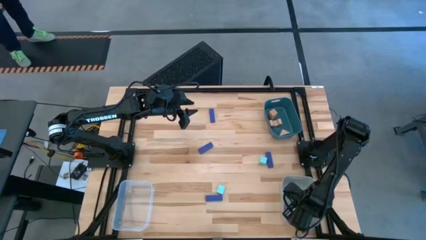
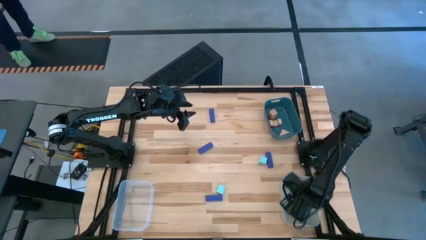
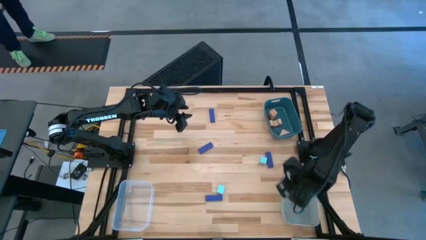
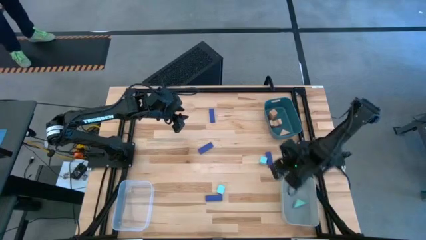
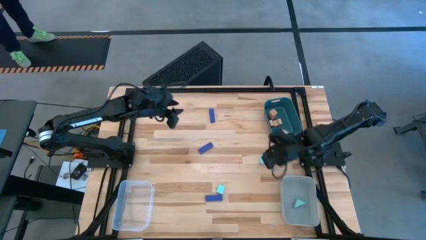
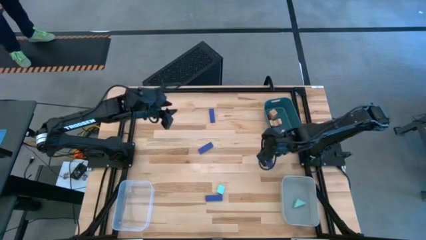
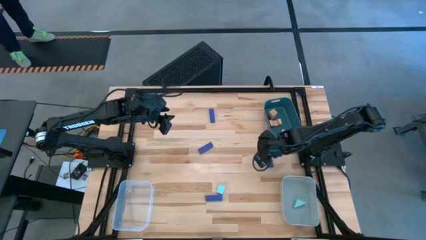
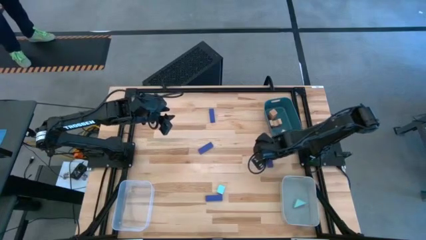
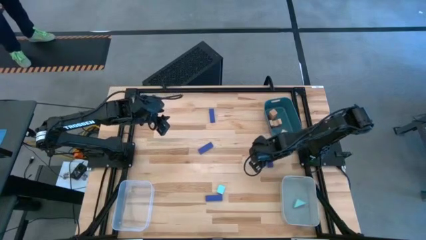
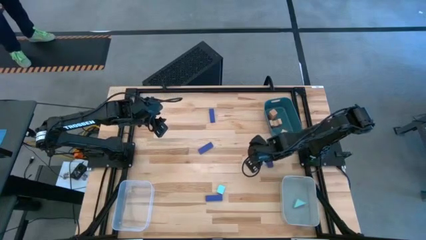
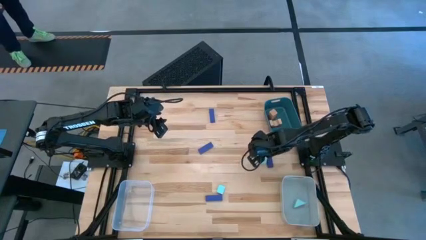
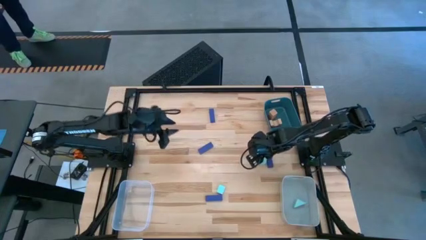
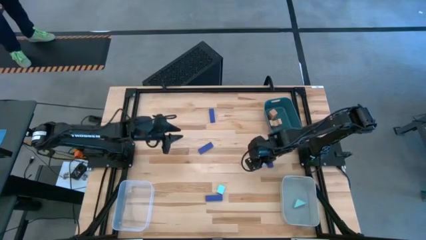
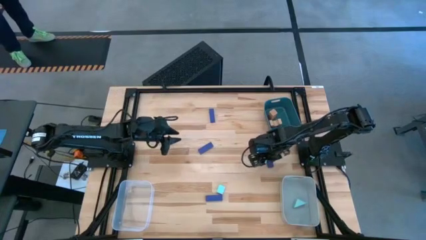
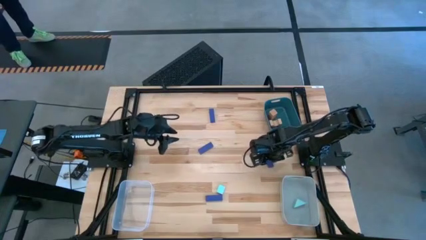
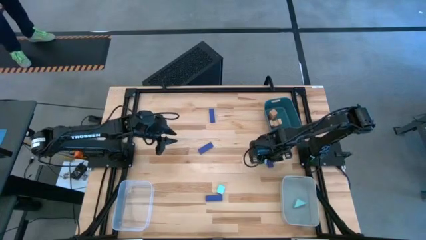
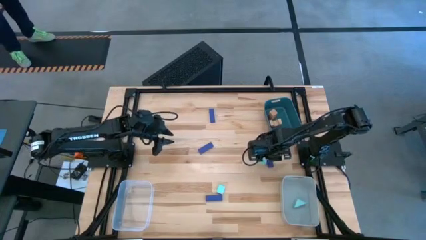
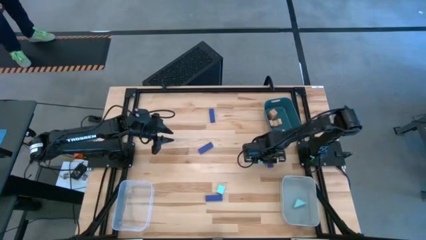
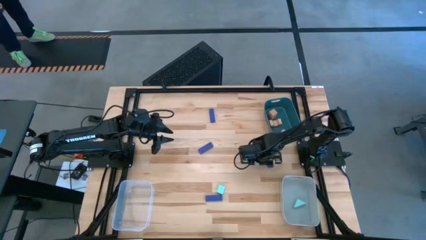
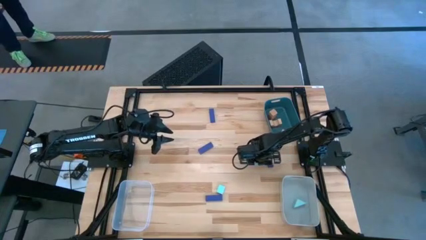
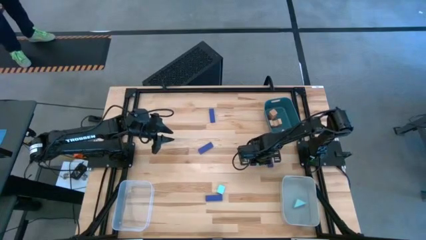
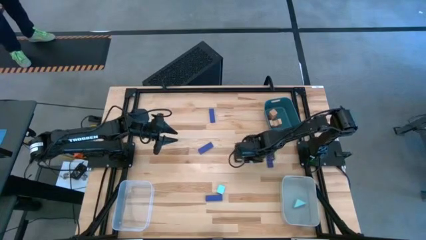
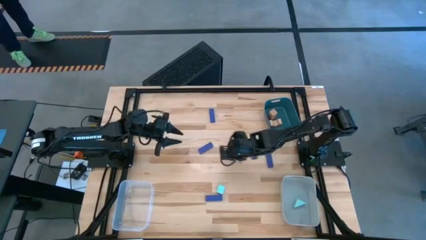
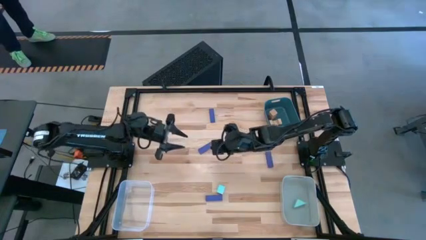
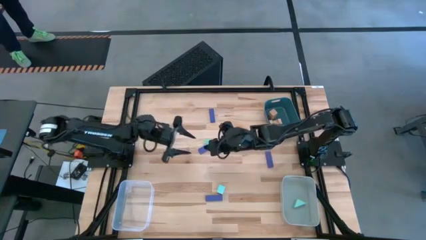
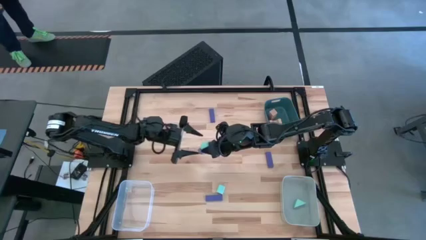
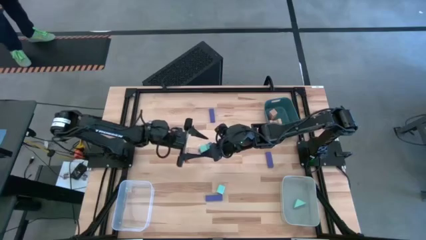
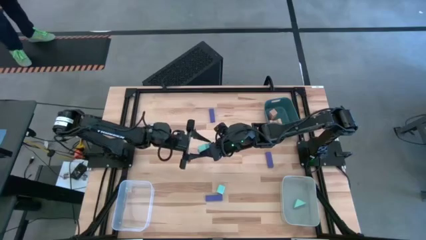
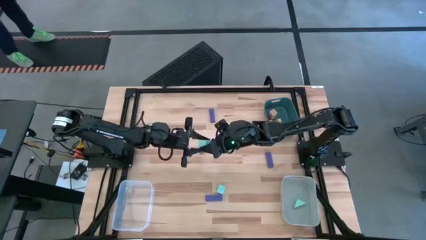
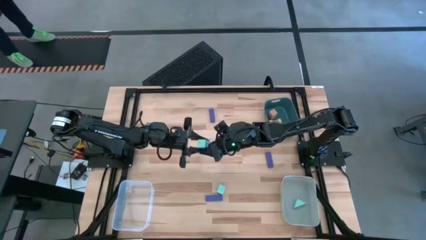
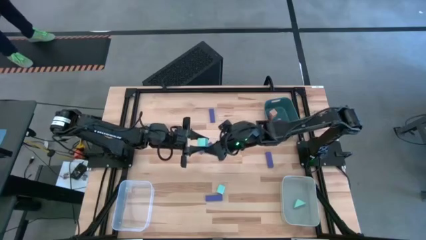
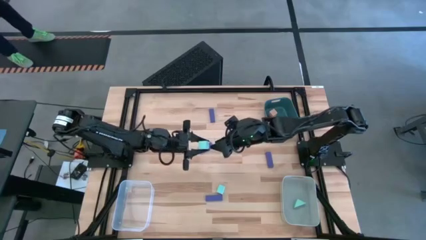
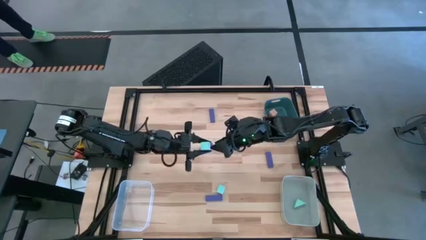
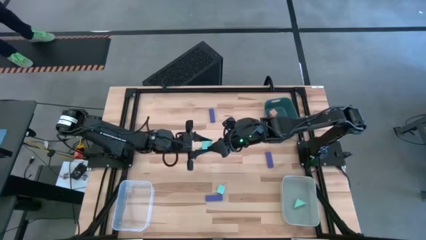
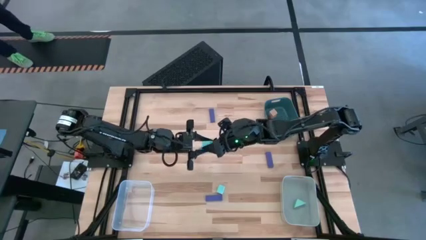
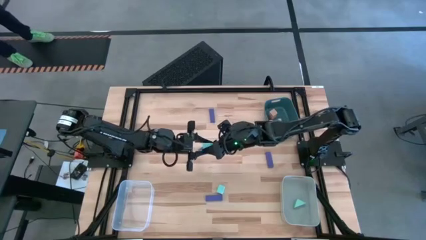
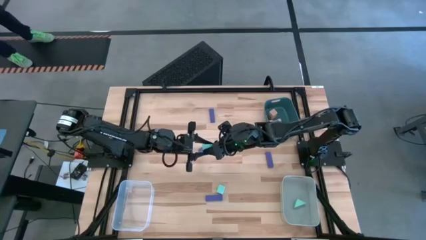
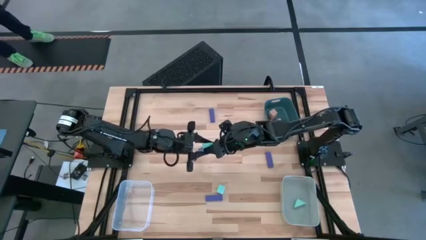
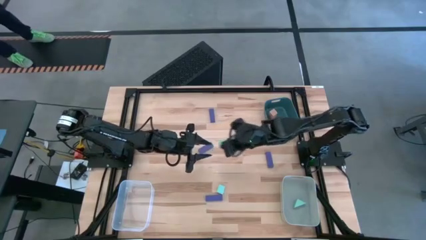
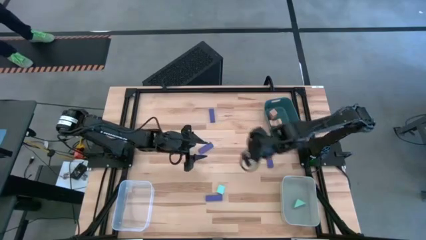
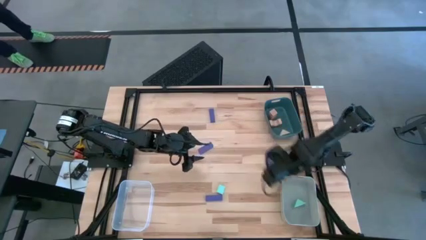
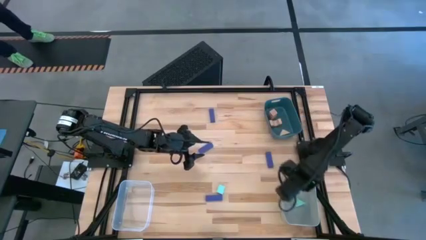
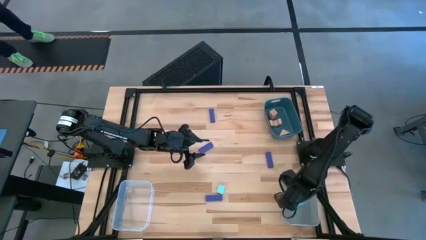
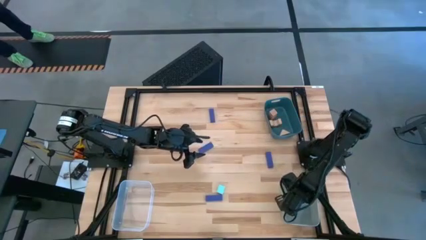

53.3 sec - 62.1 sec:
Task: Sort & place blocks by color
Put the right light blue block into the grey bin

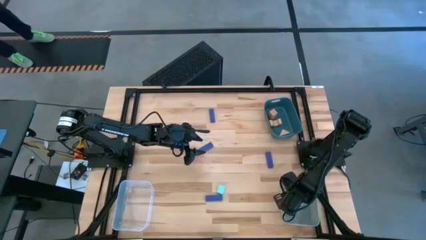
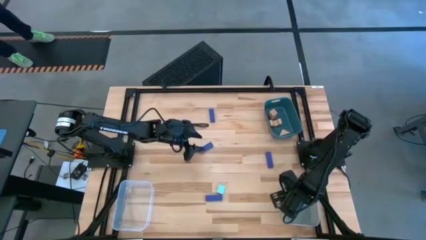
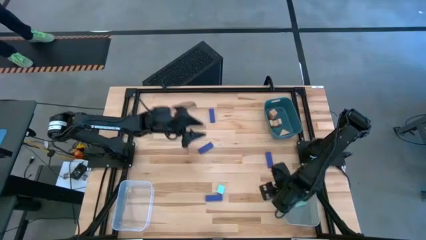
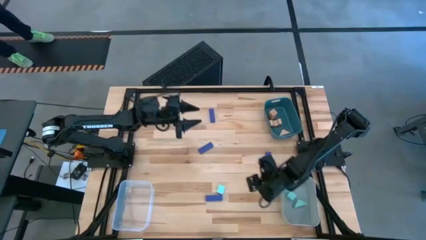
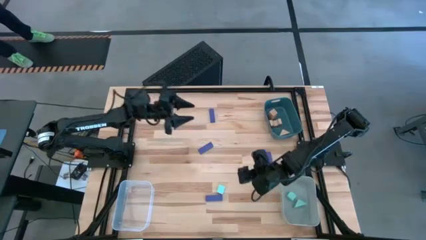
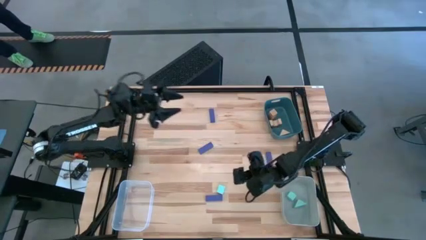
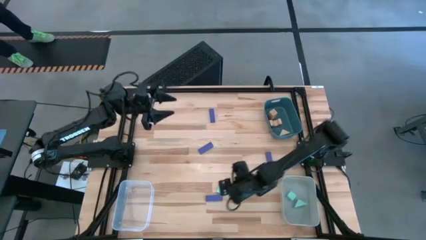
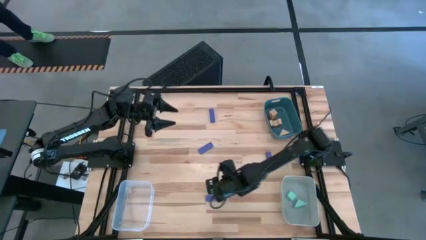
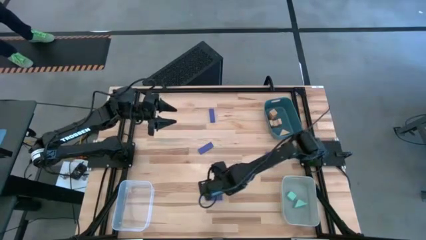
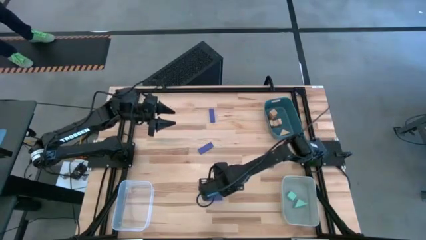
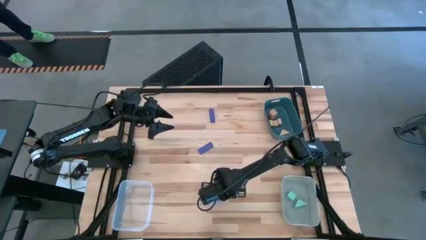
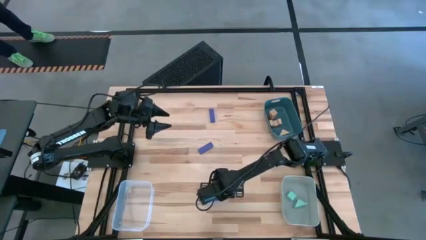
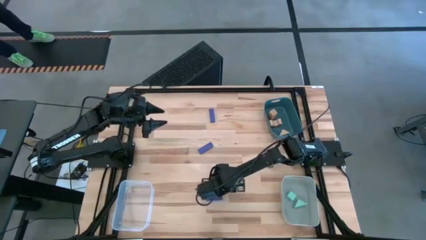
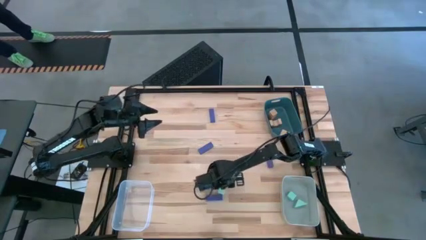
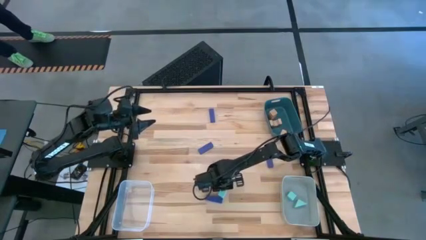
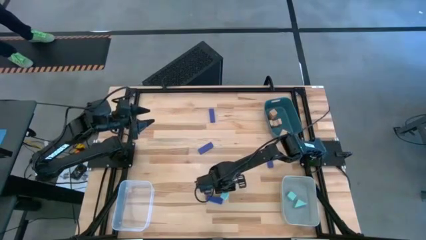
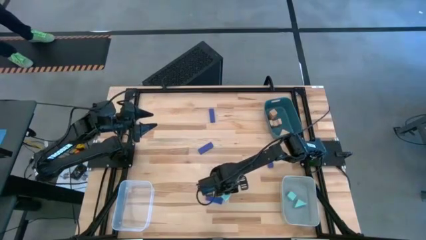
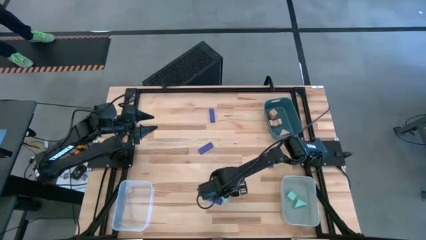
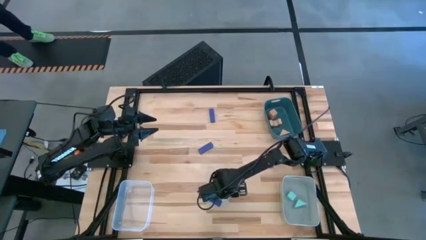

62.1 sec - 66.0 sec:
Put the light blue block into the grey bin

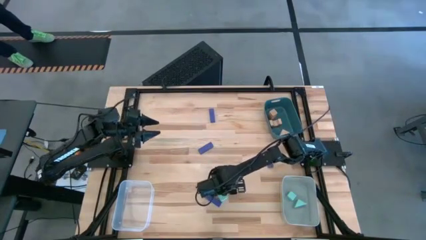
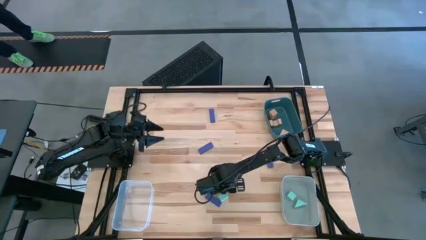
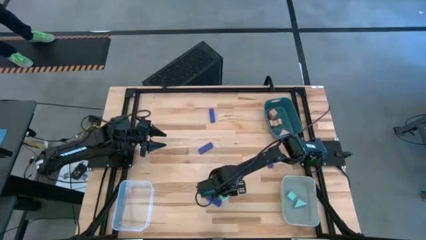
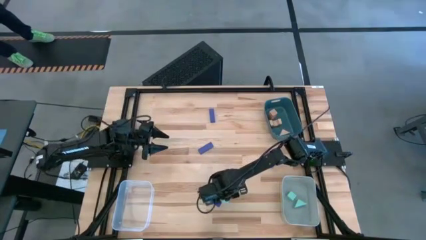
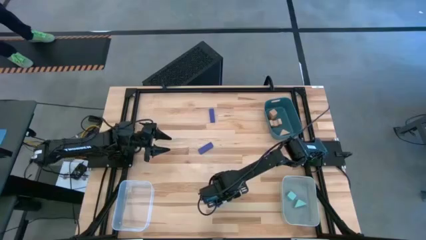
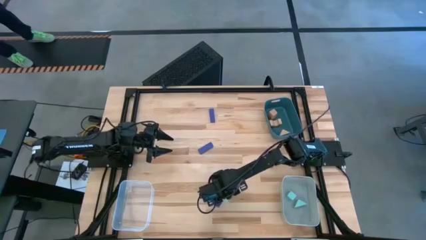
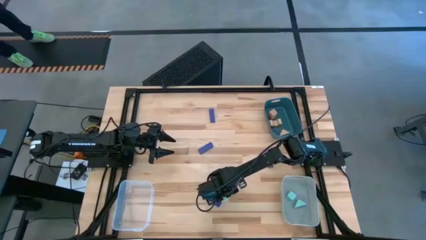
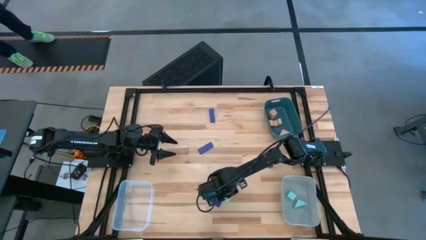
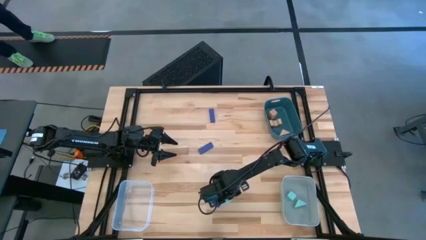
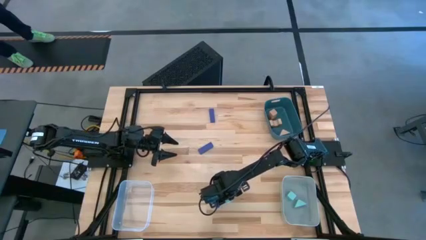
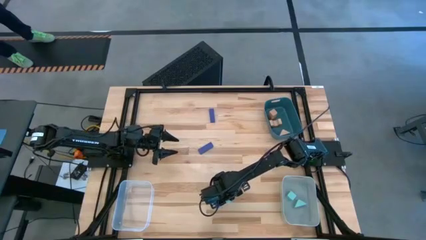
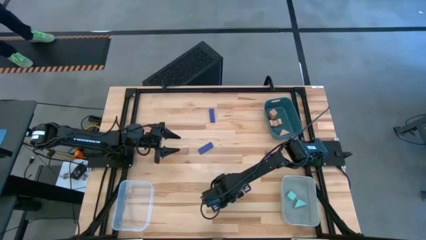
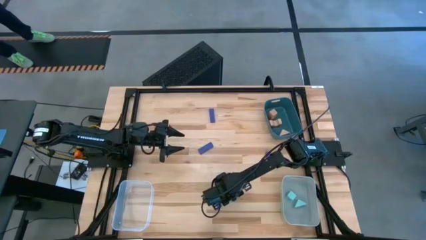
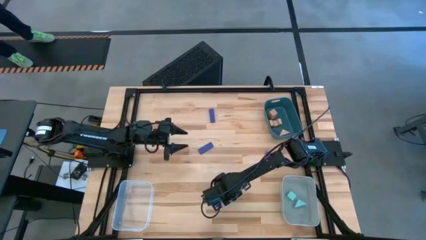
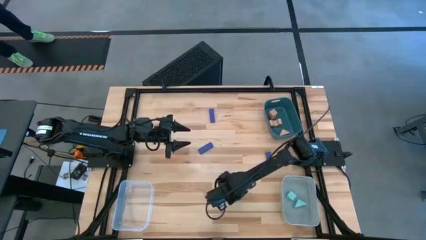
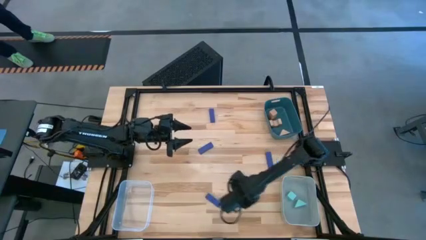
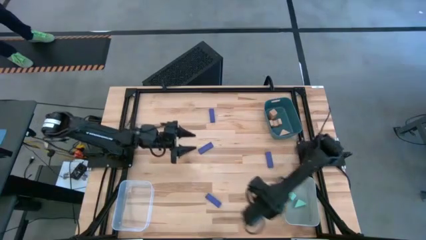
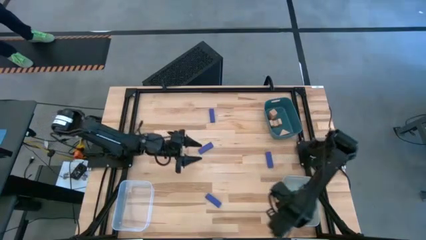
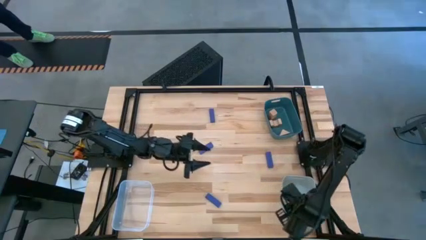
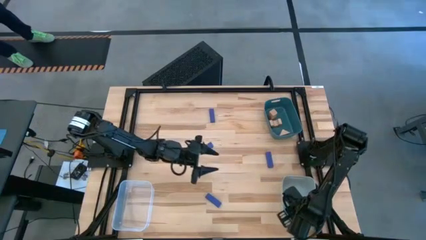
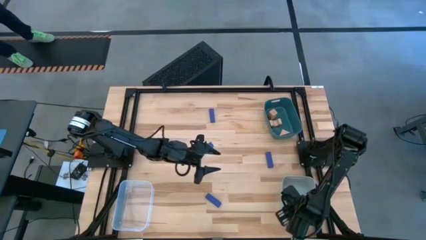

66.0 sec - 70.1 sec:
Put the light blue block into the grey bin
